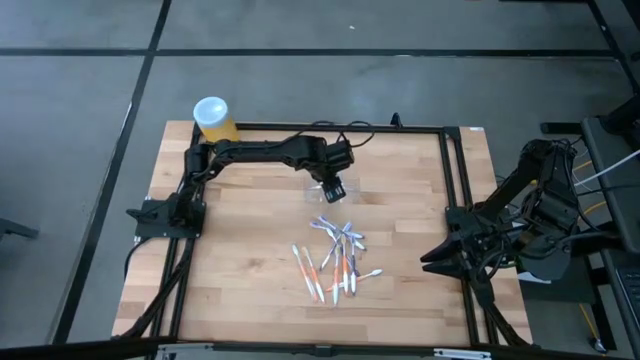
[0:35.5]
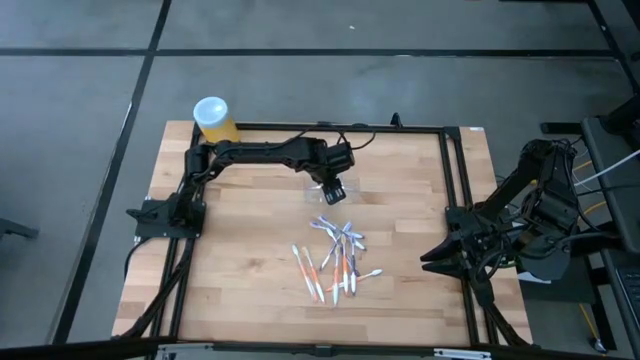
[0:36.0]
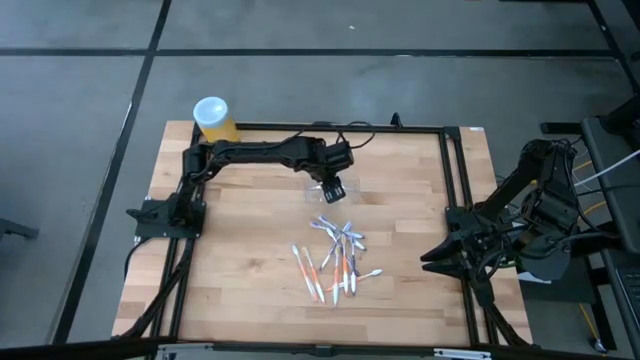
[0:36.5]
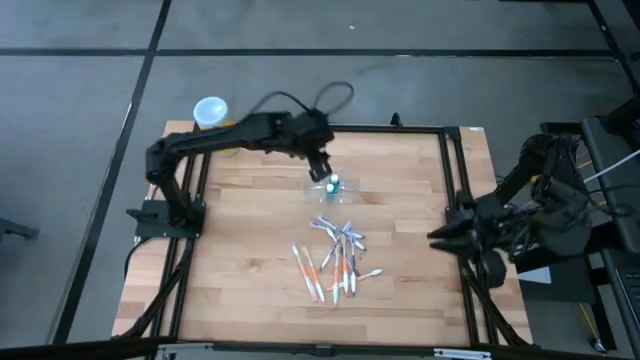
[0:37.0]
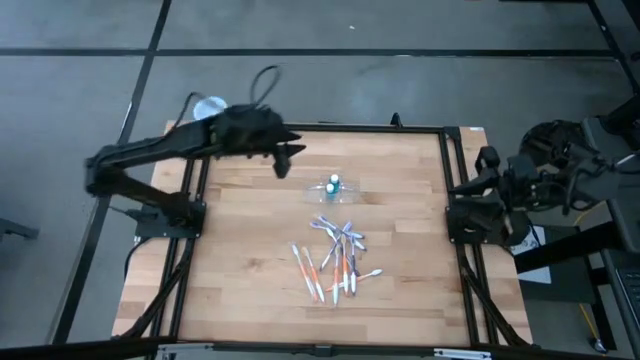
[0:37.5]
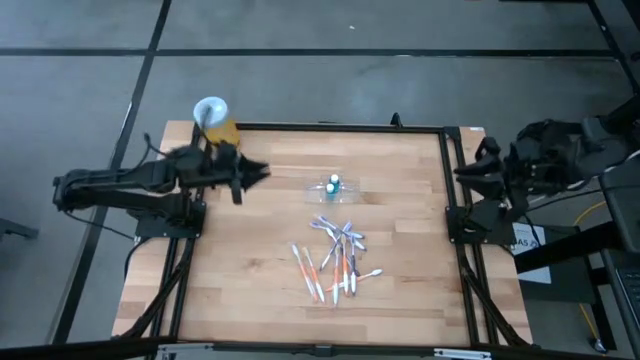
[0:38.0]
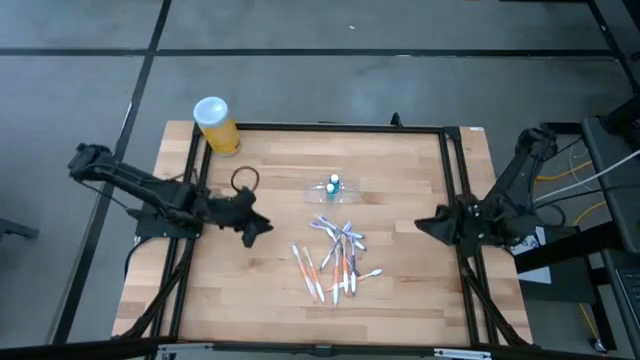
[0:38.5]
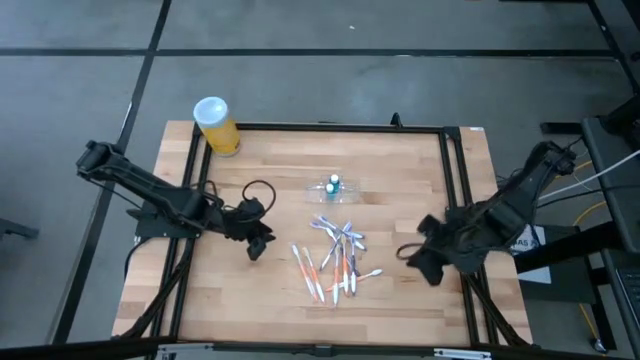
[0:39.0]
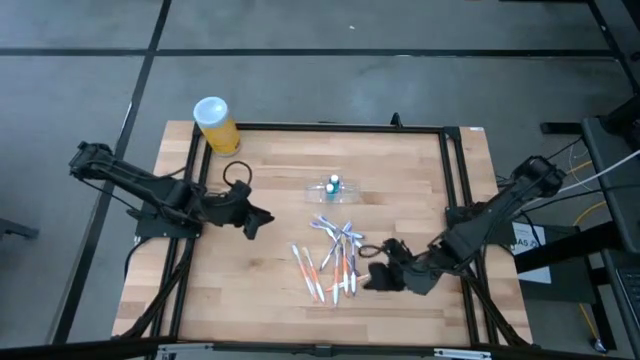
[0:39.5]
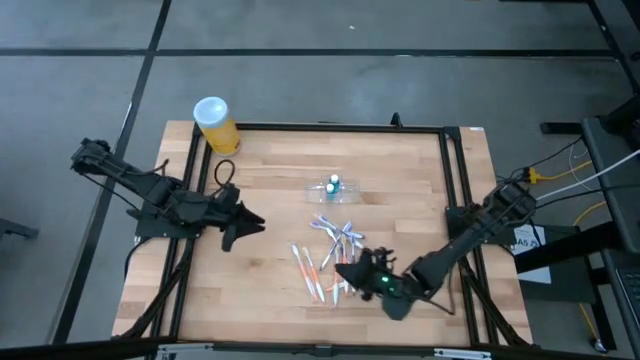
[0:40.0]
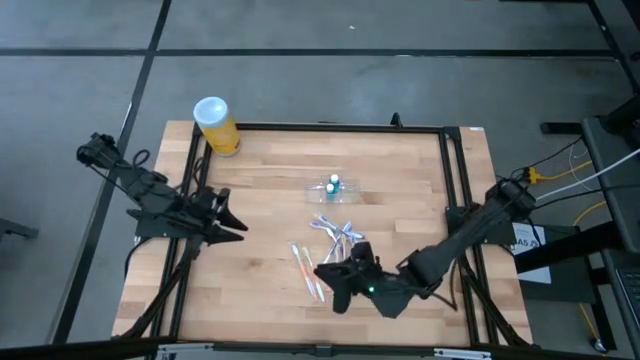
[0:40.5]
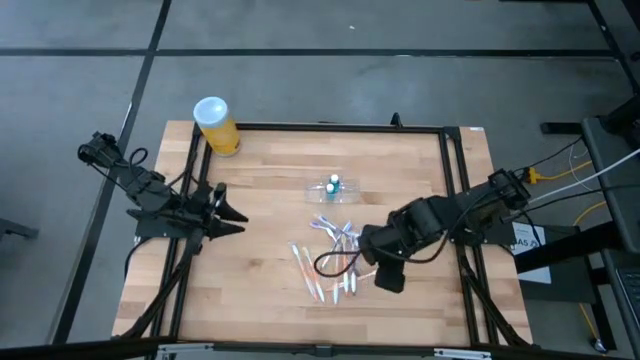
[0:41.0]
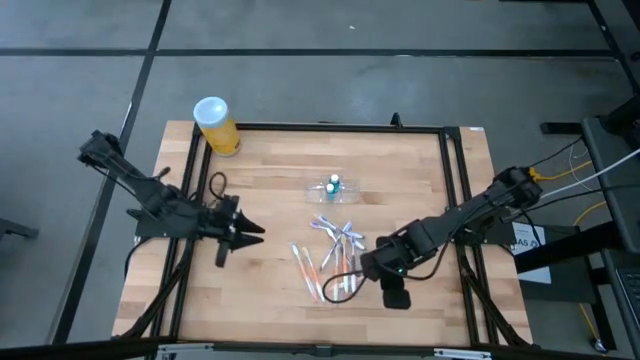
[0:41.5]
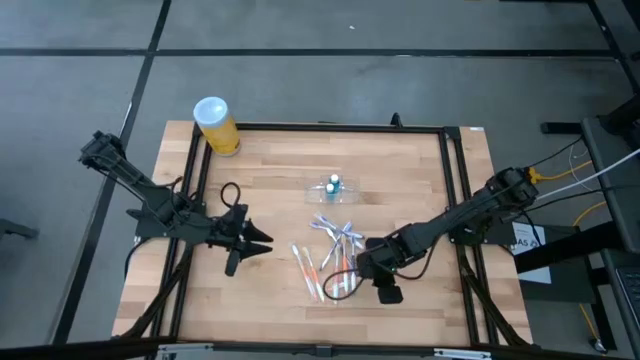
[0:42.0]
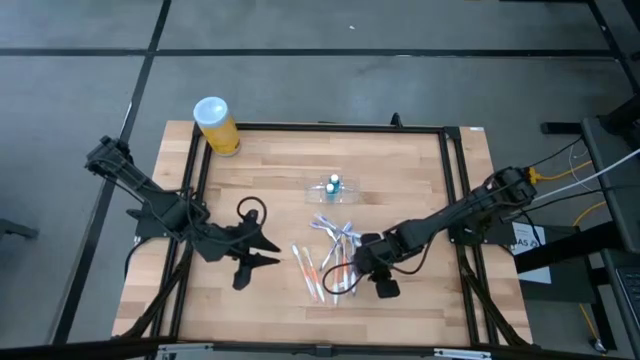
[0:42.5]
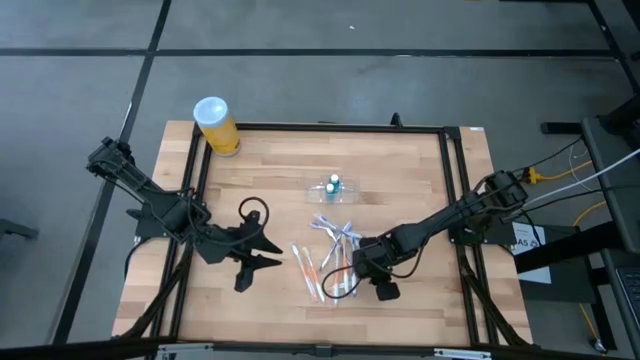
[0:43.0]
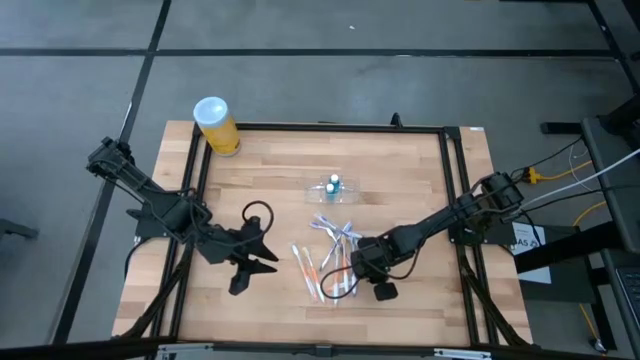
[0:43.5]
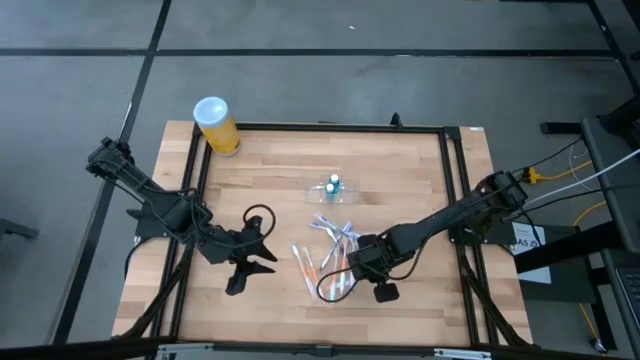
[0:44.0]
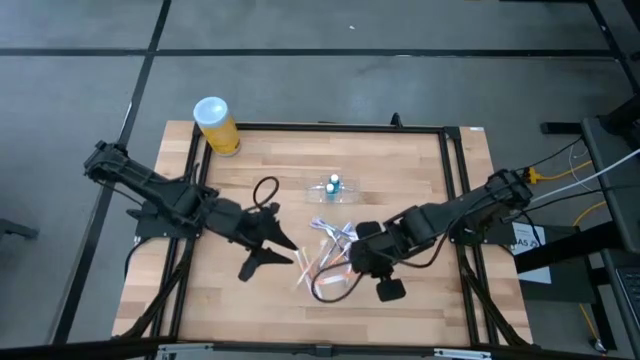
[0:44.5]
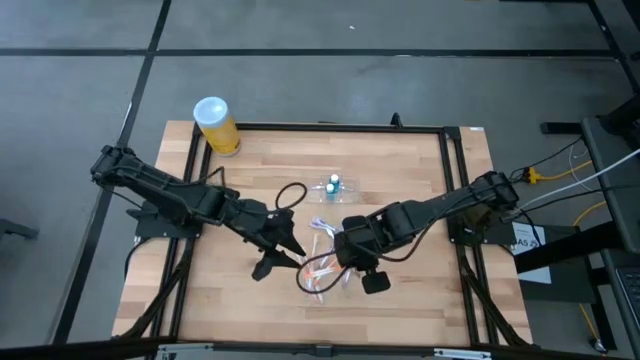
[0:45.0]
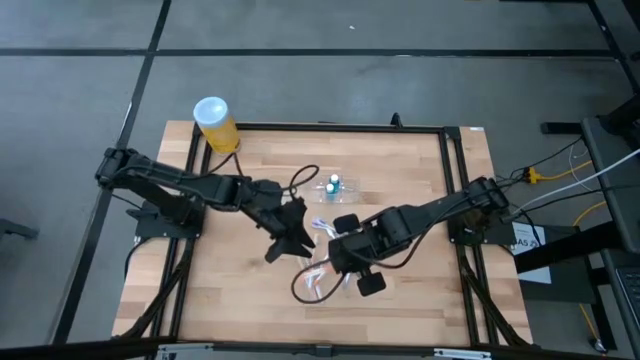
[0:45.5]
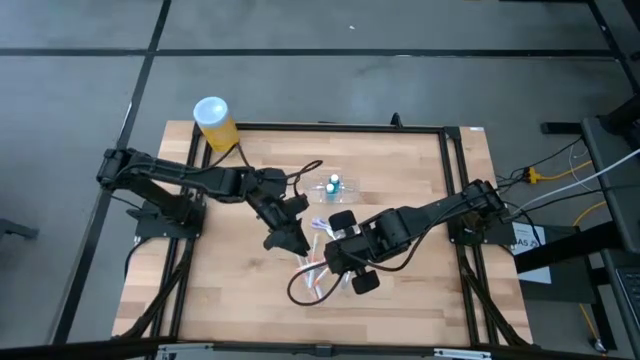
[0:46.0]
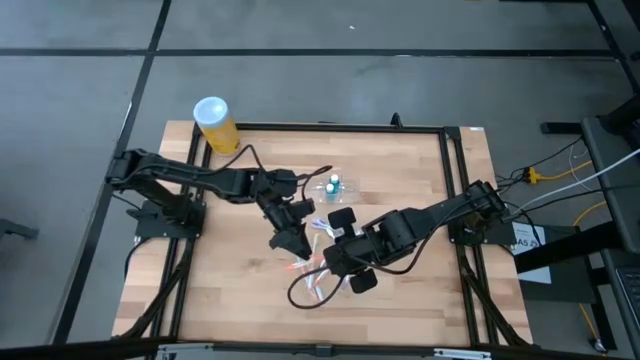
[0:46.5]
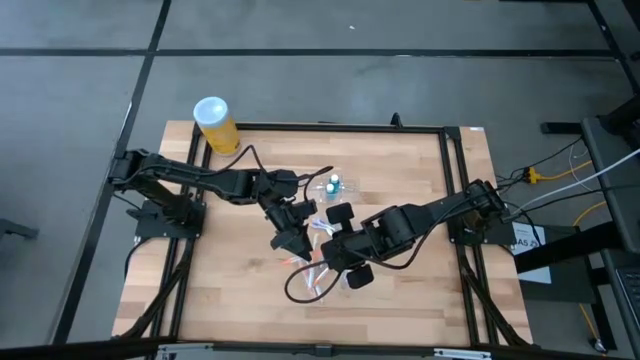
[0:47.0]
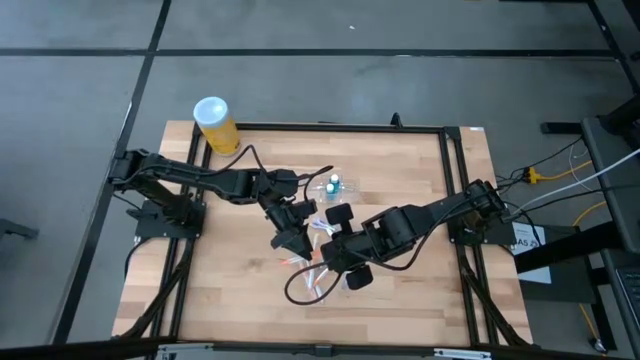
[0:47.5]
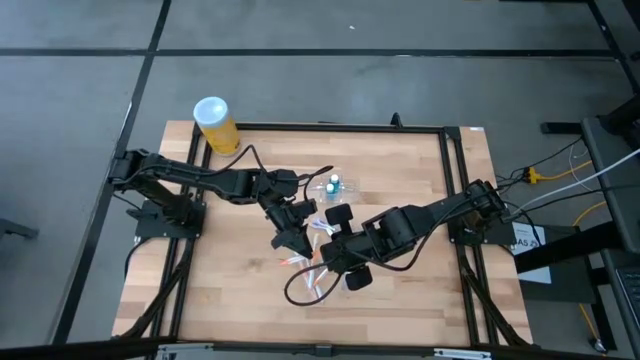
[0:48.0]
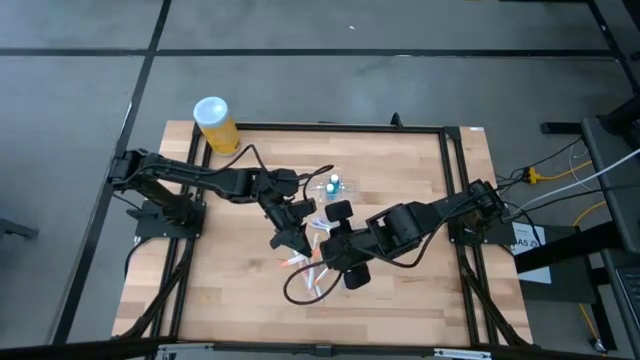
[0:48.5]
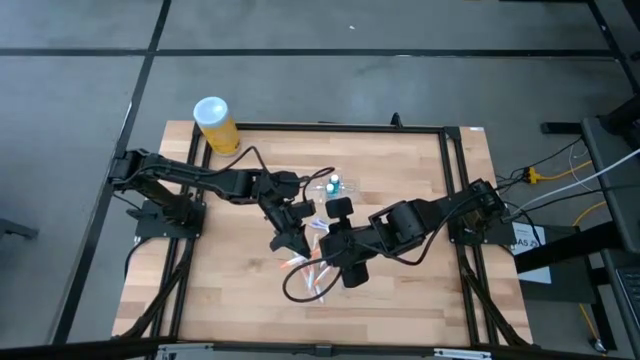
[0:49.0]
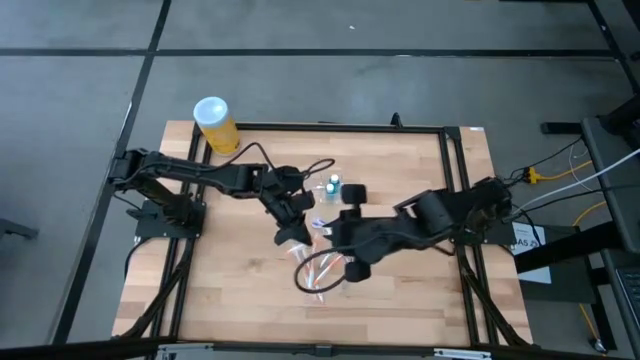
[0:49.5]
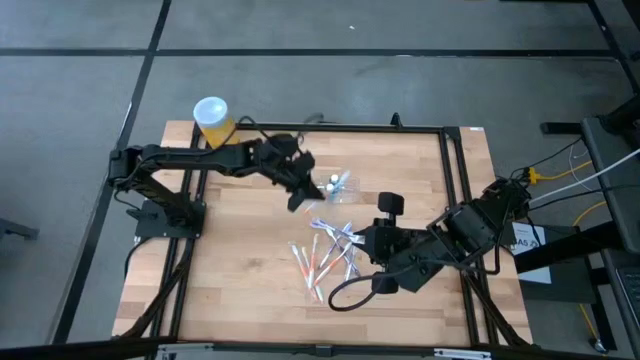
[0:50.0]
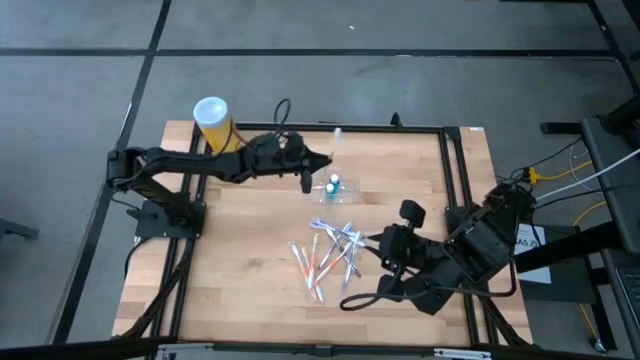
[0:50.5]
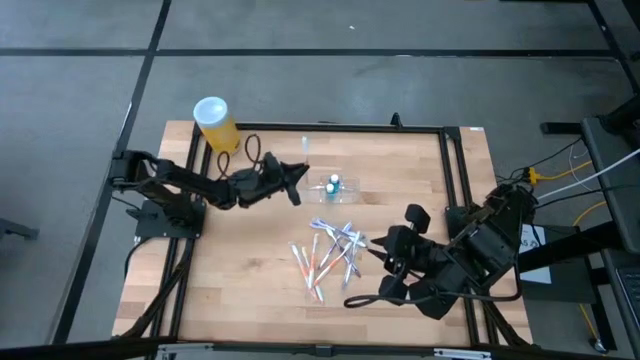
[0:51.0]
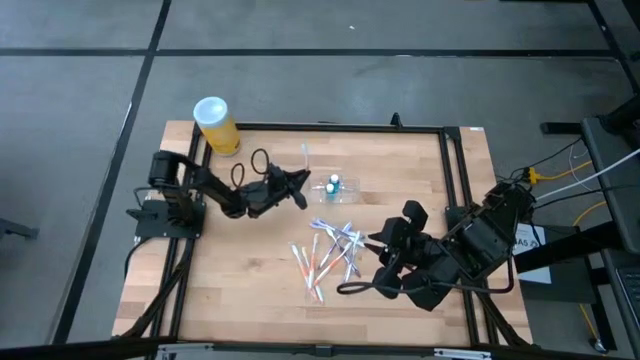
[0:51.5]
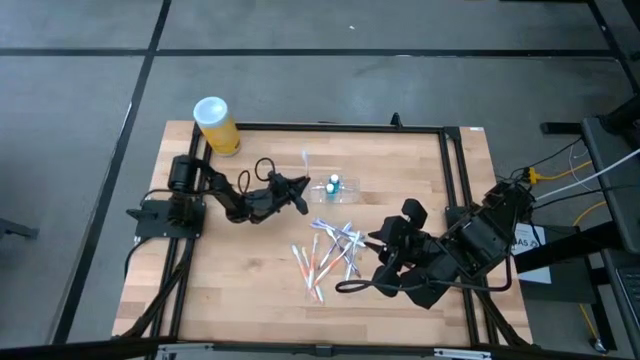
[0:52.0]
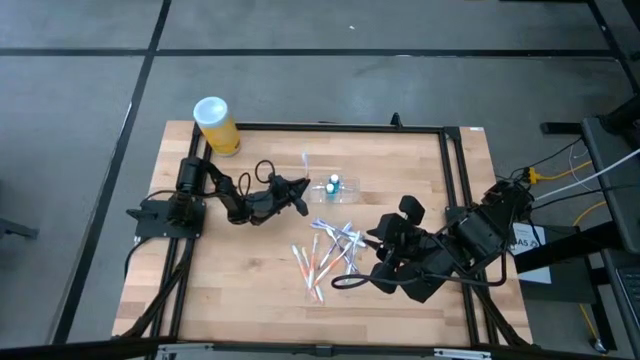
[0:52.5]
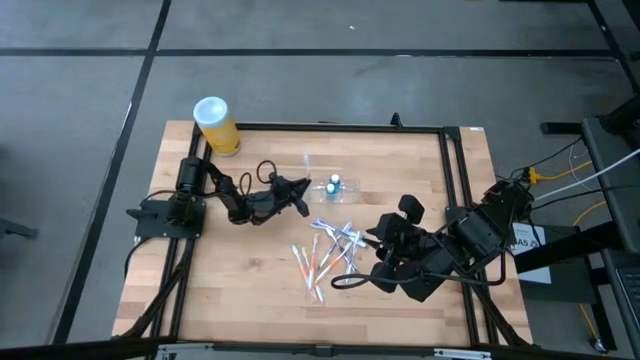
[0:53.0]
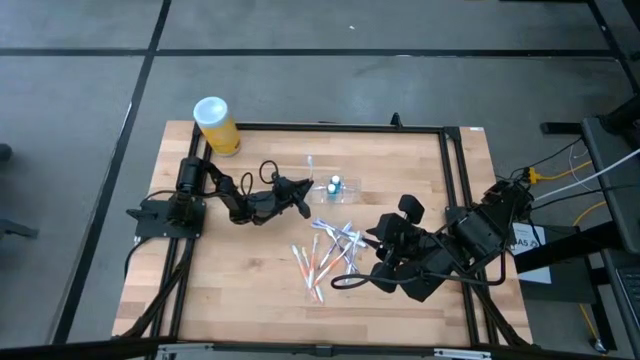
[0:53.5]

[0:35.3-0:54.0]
Task: Pick & Place toothbrushing station
Put the orange toothbrush into the transparent organizer

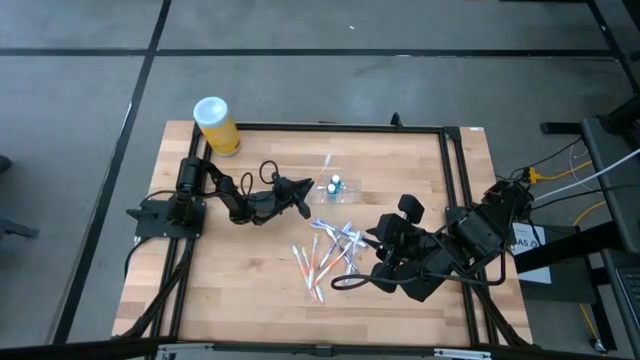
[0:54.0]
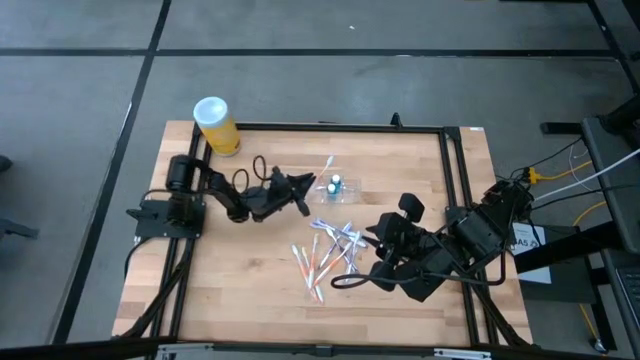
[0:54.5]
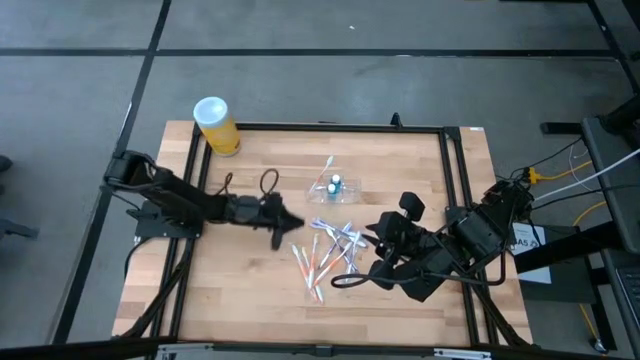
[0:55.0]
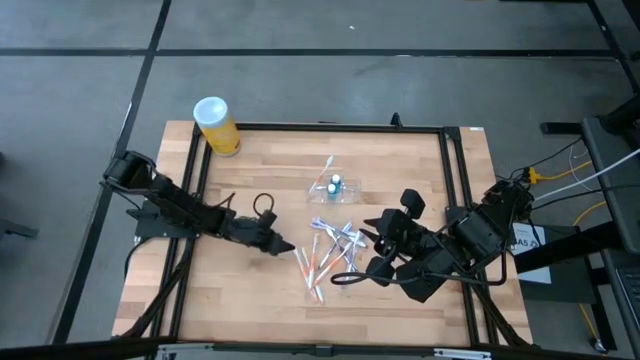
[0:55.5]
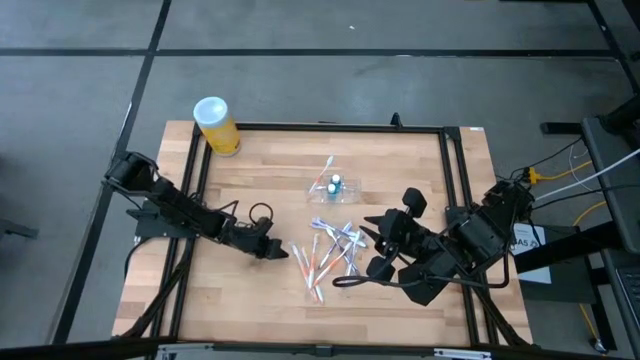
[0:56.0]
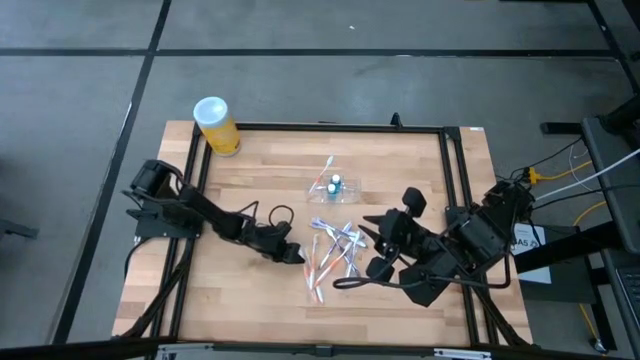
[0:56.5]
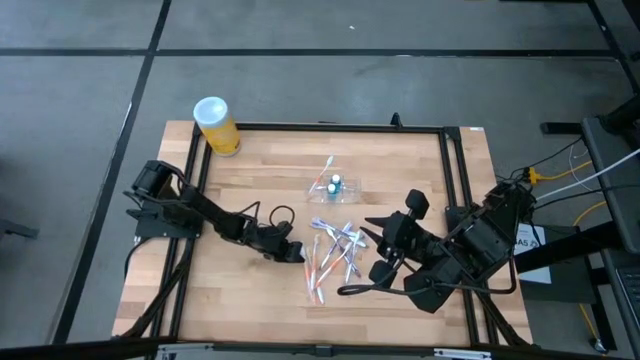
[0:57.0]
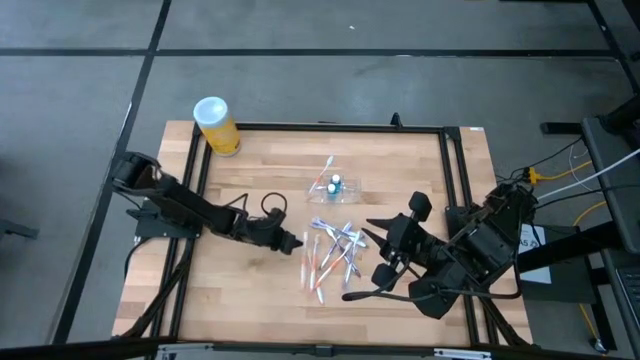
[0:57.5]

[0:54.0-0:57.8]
Put the orange toothbrush into the transparent organizer
